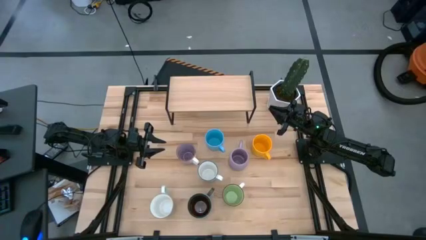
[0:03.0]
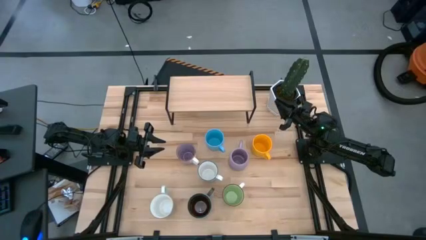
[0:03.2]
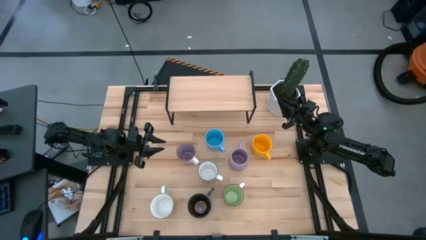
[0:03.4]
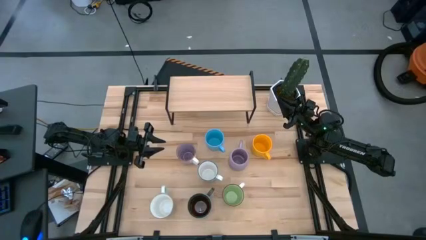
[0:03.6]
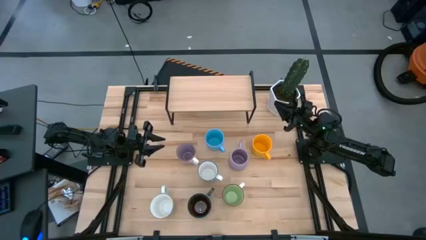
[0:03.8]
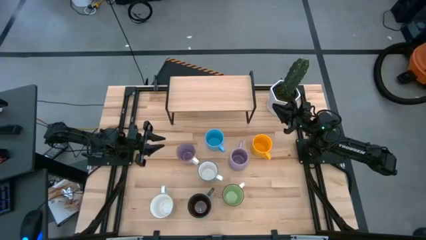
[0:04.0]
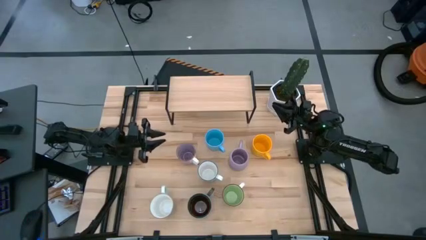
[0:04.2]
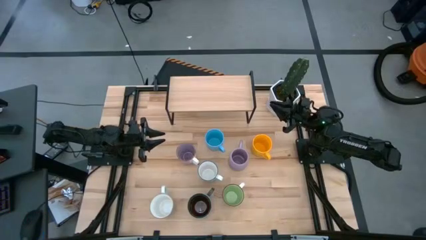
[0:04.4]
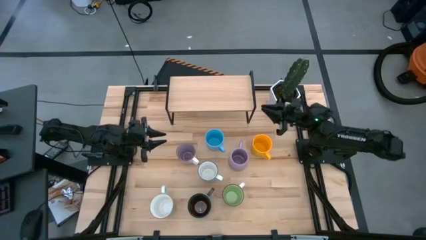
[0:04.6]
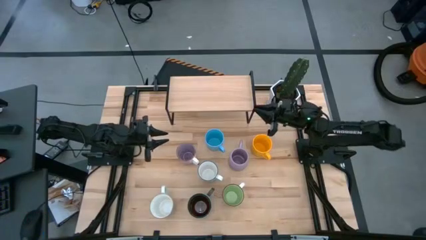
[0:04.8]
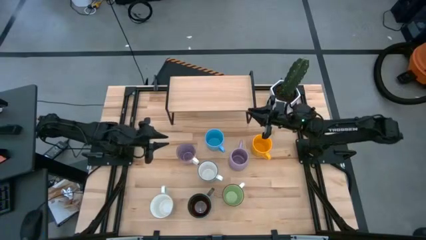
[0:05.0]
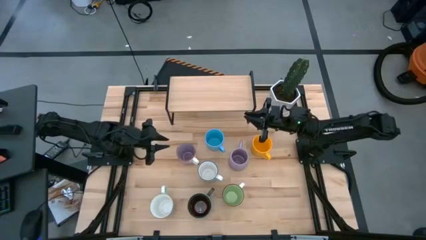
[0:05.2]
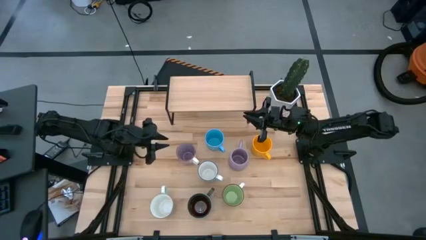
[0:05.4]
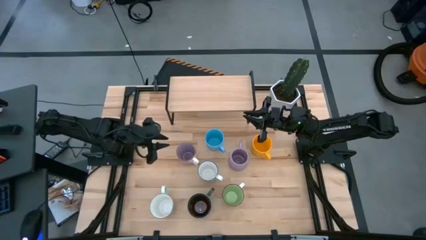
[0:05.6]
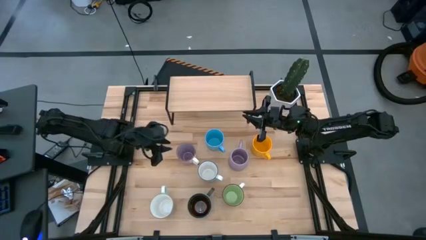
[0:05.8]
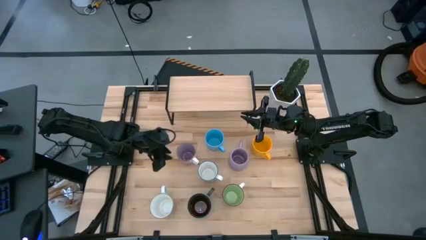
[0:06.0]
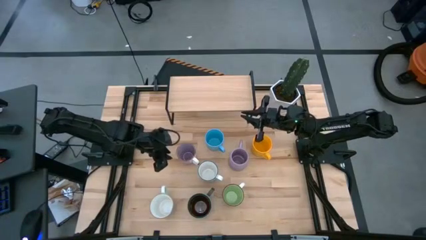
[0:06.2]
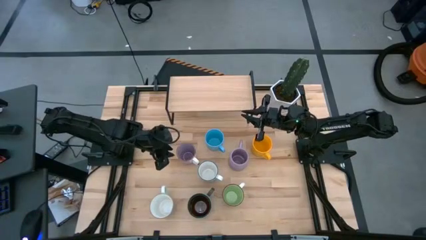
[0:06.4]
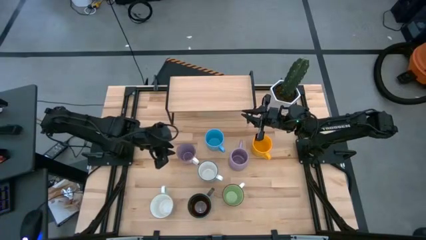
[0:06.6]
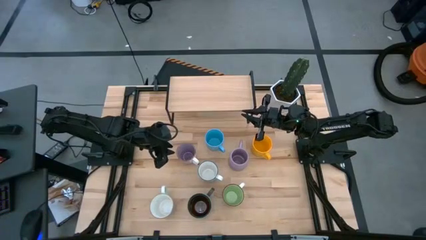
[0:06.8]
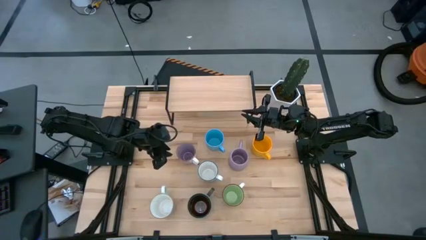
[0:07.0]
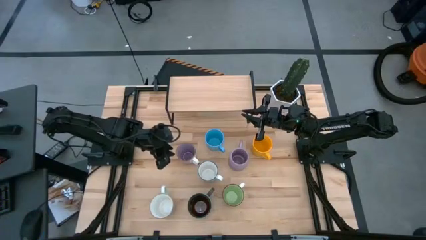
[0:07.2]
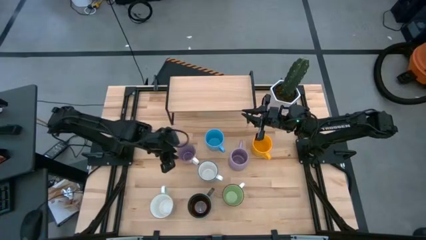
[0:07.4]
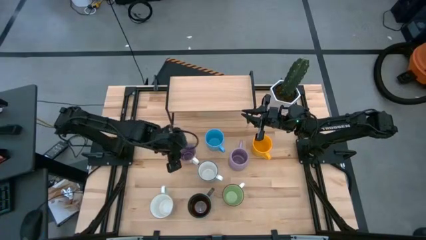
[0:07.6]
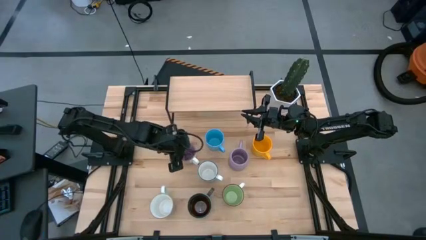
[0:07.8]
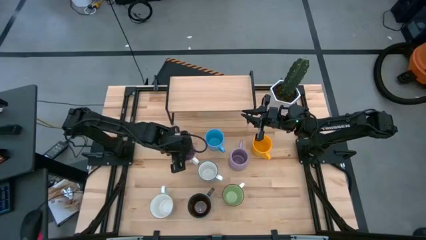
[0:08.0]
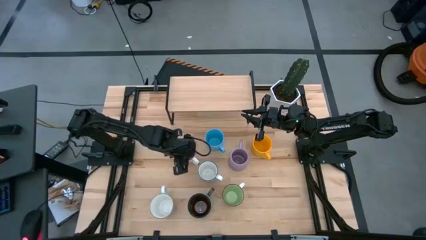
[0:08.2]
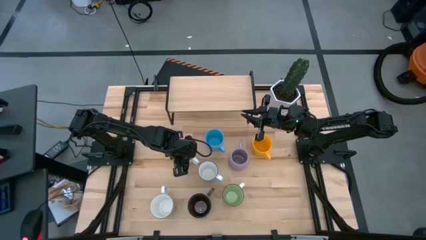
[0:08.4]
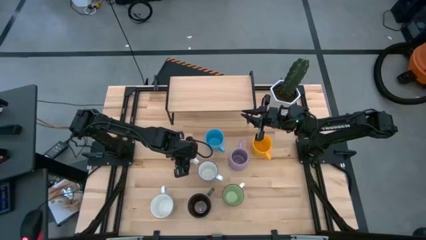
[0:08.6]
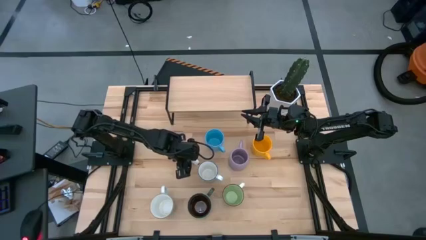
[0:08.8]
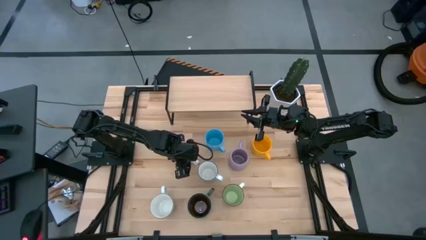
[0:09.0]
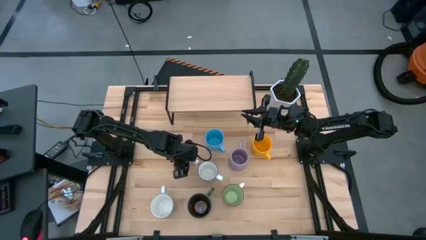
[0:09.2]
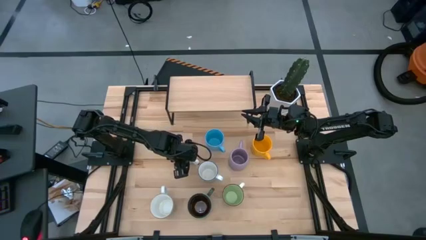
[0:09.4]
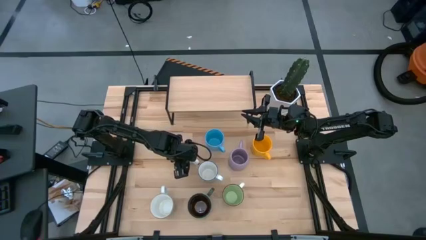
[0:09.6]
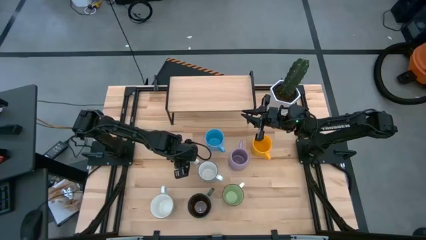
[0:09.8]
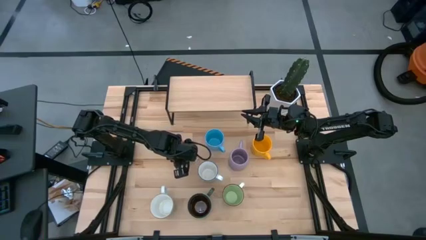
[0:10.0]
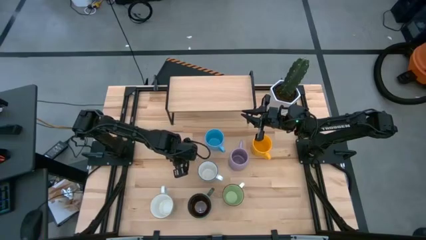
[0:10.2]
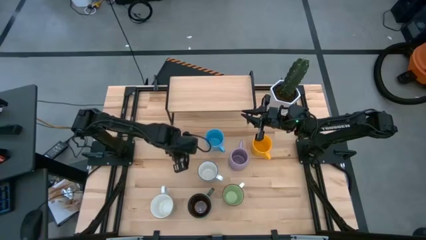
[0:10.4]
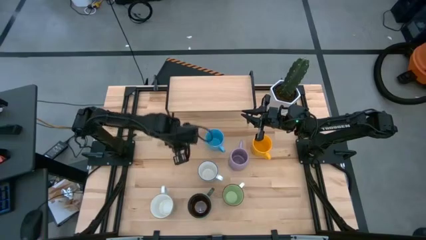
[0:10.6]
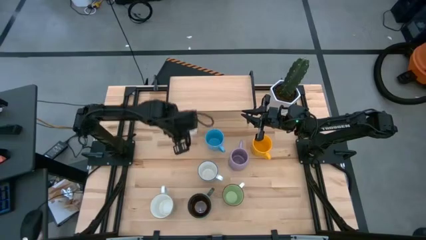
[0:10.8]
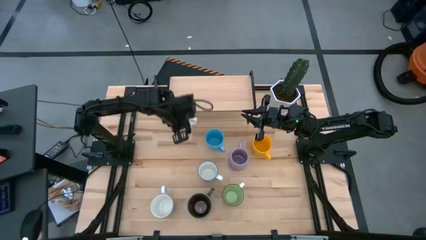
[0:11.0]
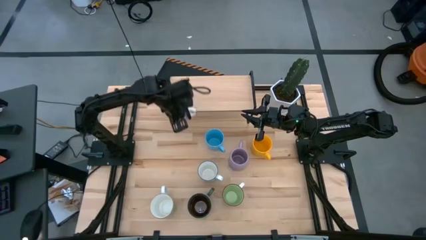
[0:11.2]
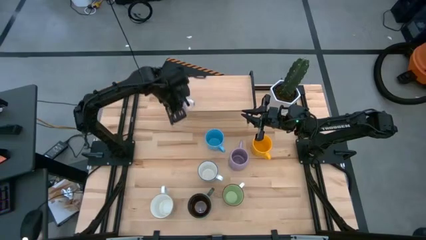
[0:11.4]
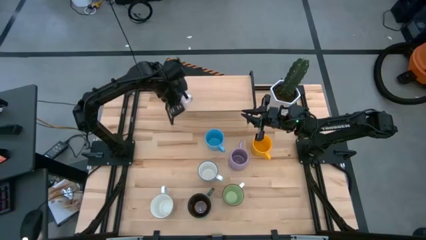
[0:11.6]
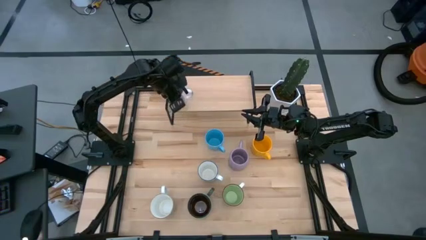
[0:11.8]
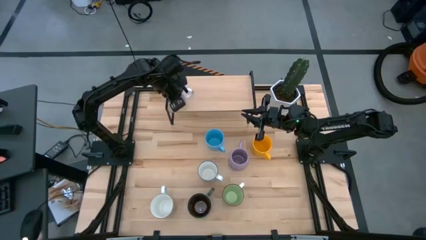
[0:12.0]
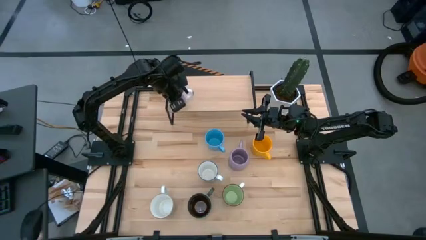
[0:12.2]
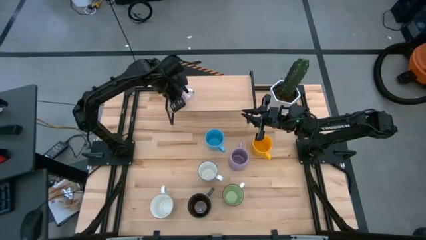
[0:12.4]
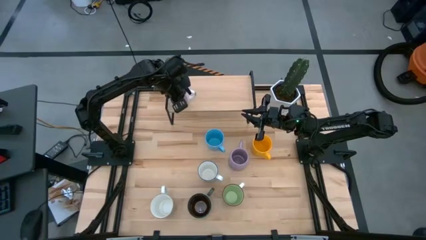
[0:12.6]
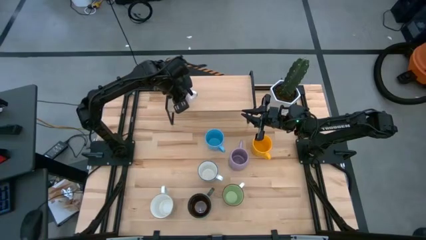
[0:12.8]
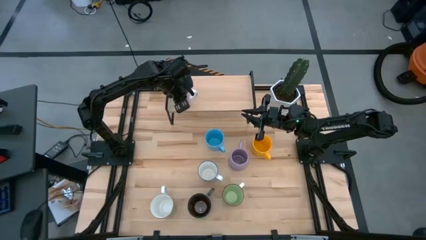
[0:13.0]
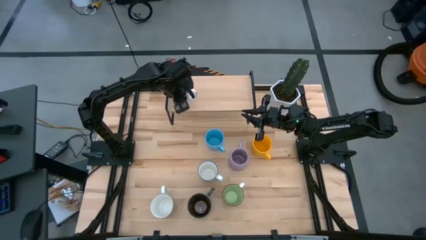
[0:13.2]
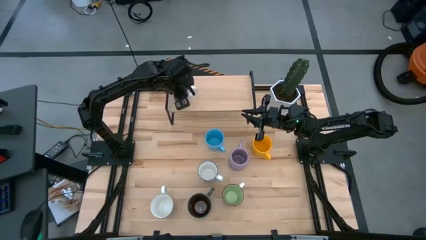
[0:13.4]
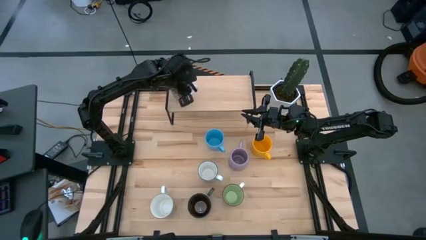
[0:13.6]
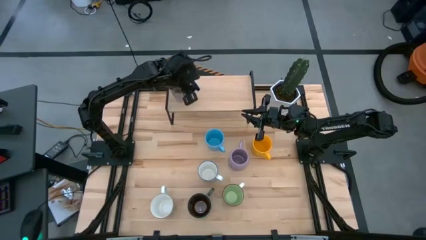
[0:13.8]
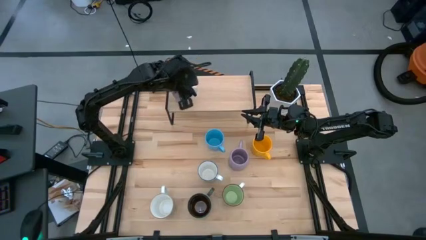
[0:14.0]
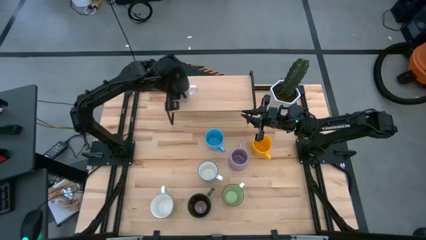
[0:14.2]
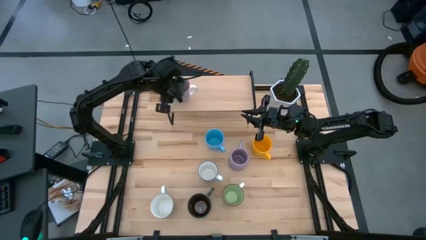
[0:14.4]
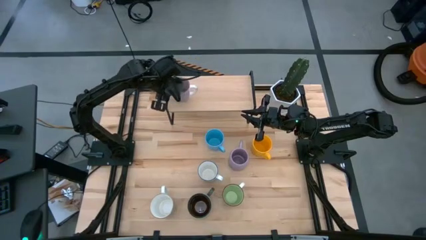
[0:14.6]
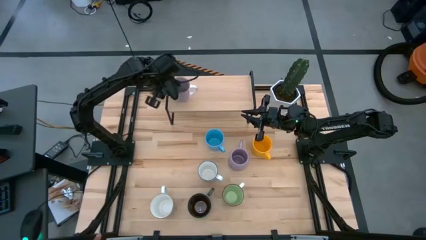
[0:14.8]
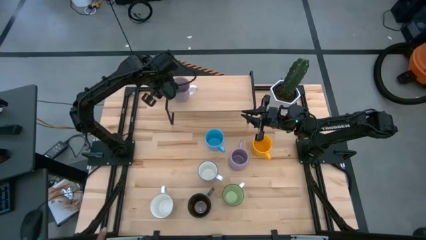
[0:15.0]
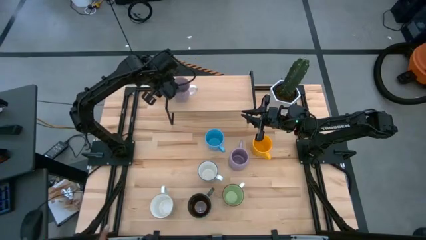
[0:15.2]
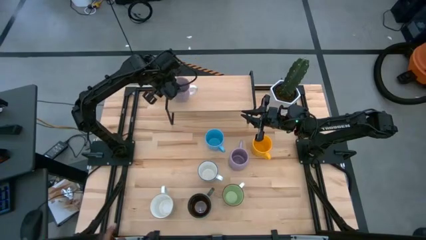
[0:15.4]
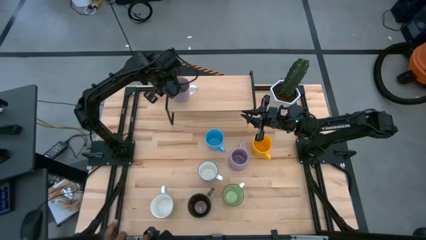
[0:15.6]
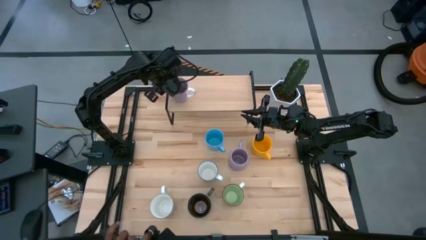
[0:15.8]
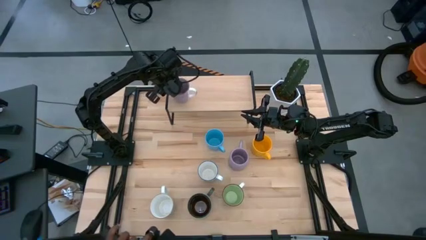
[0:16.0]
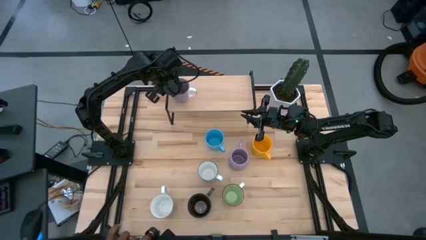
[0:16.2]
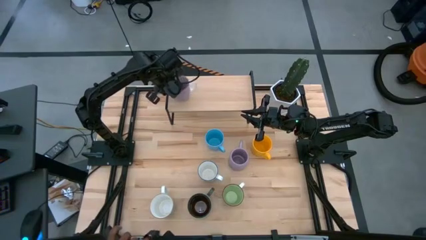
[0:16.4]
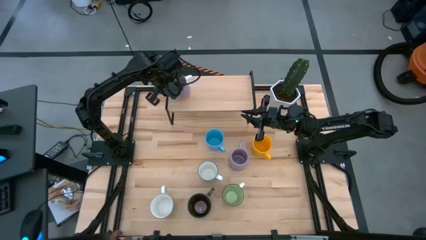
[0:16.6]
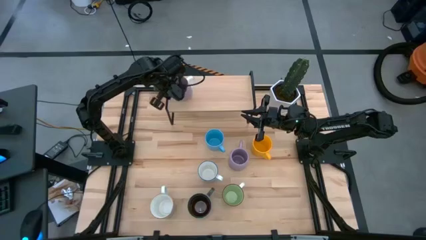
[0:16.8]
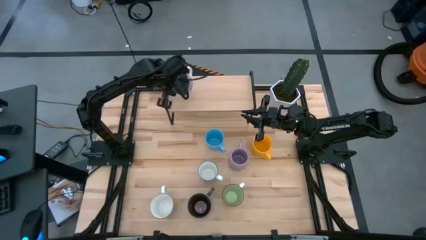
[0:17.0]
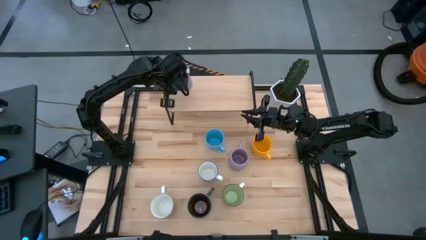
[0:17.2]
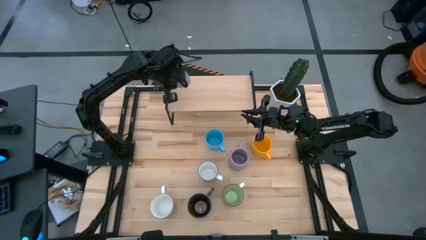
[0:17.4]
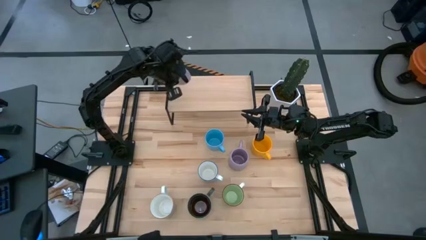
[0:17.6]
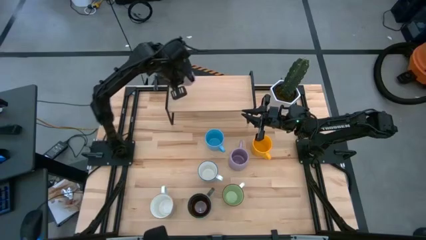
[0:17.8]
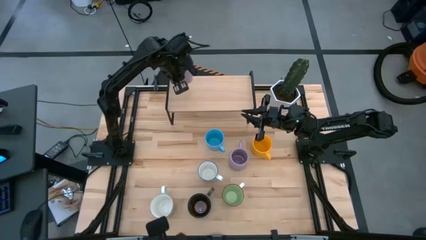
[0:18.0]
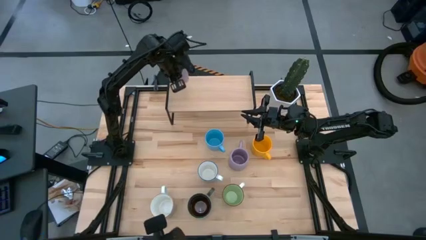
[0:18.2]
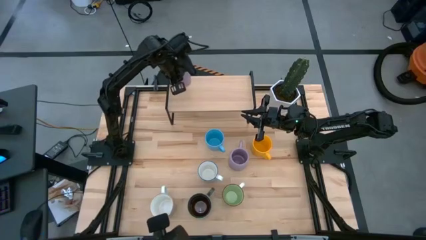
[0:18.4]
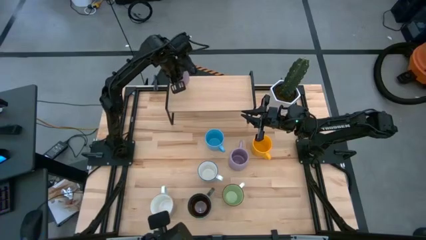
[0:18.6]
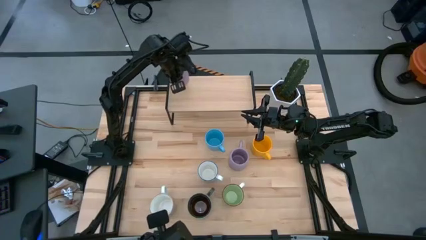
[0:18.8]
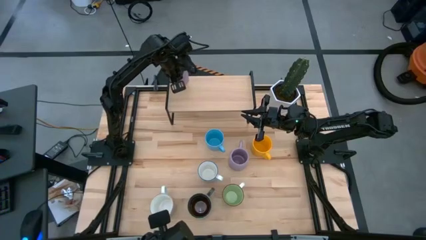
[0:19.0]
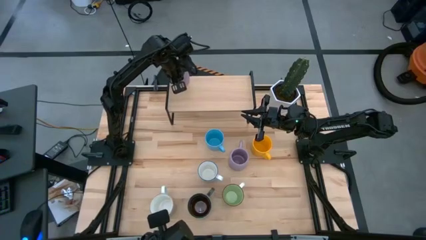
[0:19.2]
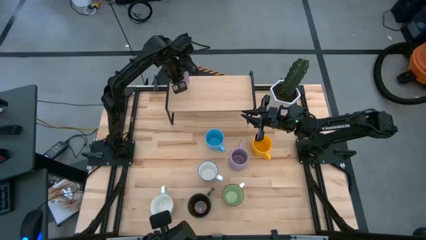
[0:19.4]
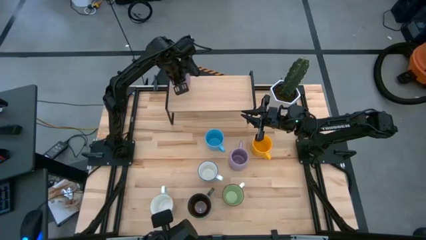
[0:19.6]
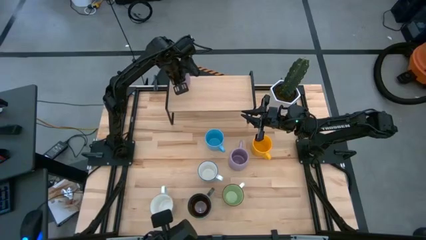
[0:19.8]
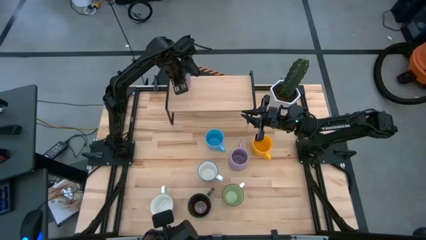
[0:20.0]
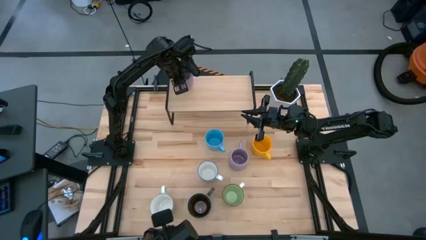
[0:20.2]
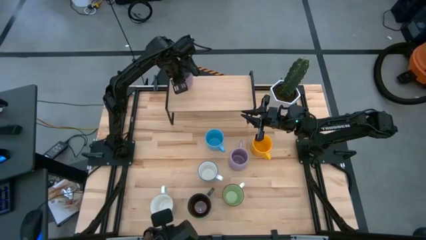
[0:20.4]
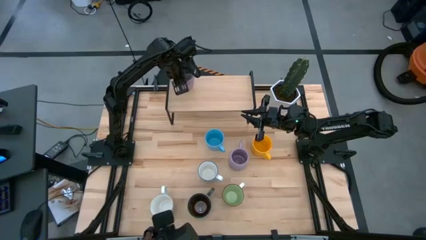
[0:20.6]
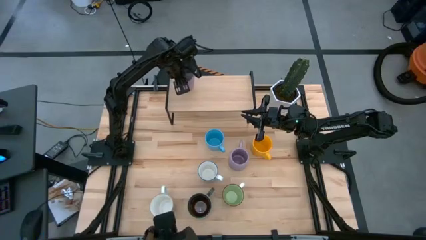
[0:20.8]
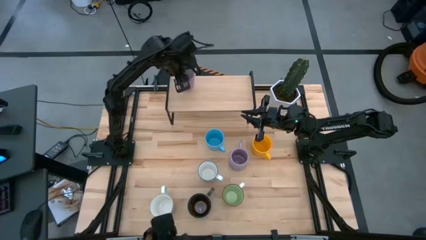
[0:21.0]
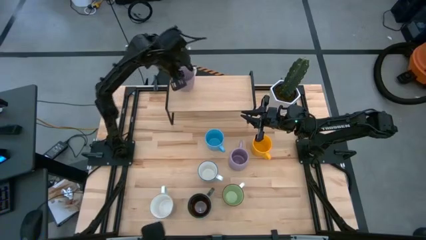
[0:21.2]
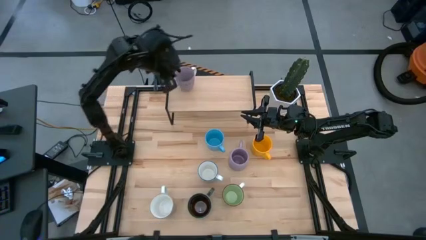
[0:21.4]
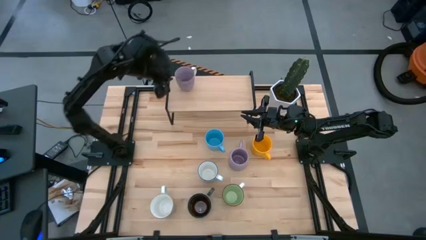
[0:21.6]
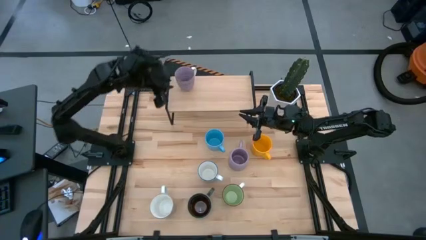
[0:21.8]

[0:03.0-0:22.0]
Task: Place coffee mugs
Put the left purple mug on the shelf
